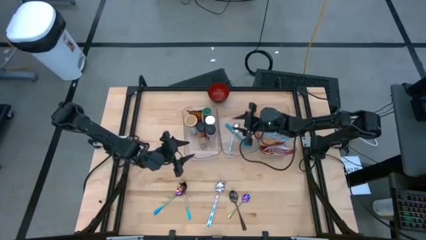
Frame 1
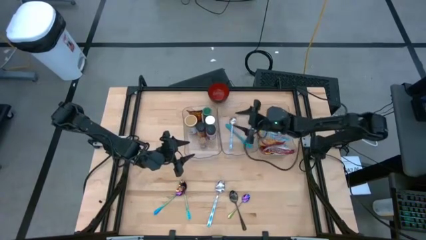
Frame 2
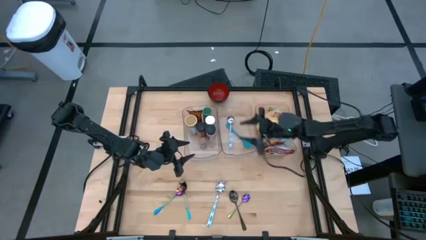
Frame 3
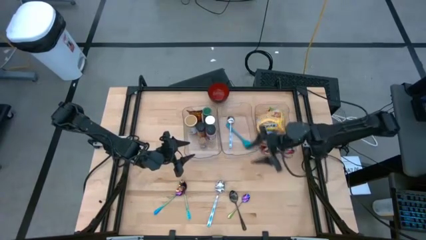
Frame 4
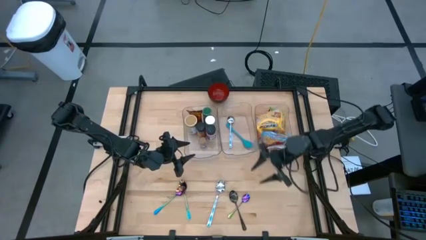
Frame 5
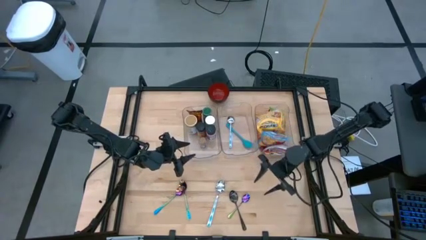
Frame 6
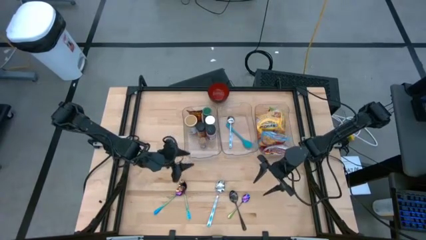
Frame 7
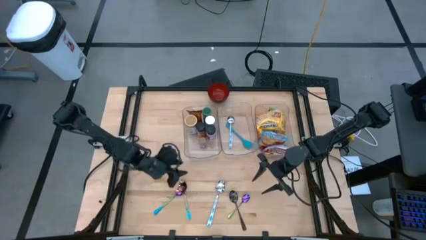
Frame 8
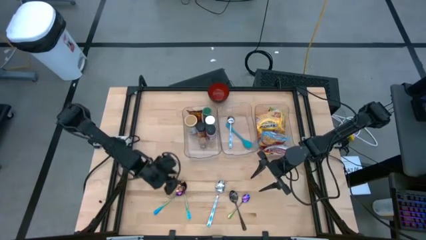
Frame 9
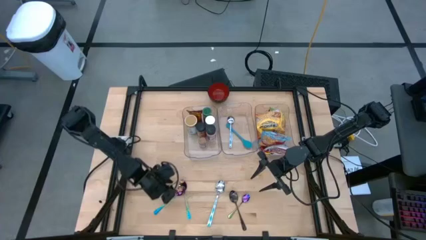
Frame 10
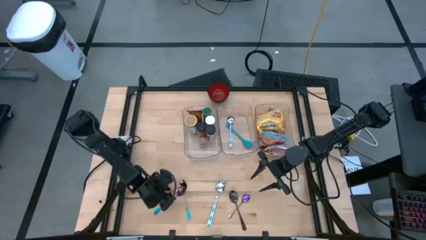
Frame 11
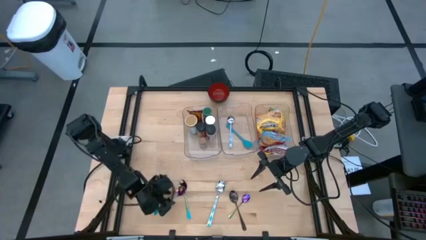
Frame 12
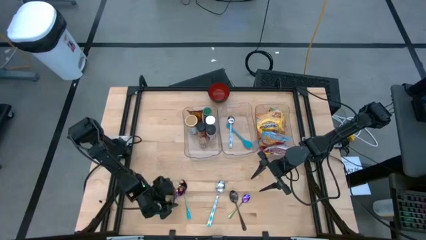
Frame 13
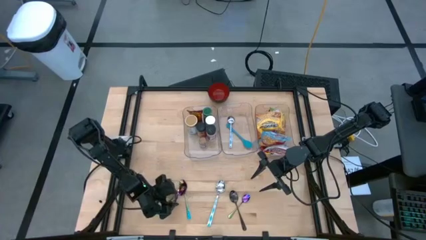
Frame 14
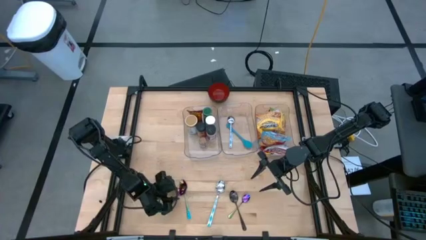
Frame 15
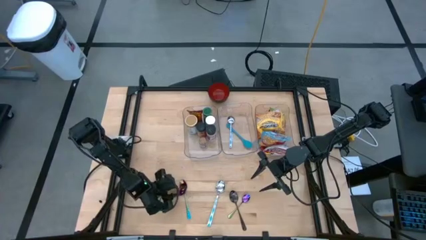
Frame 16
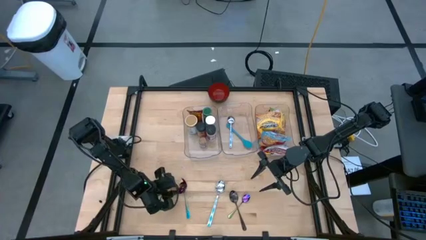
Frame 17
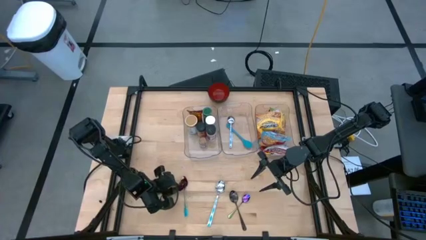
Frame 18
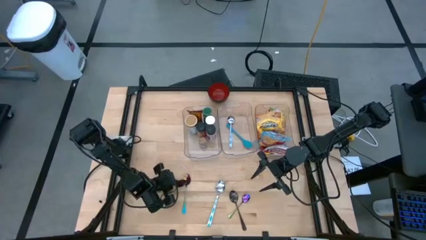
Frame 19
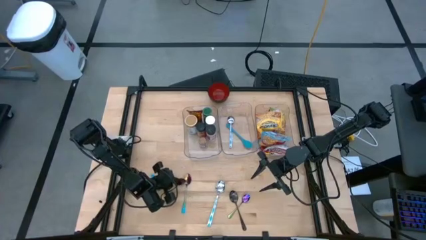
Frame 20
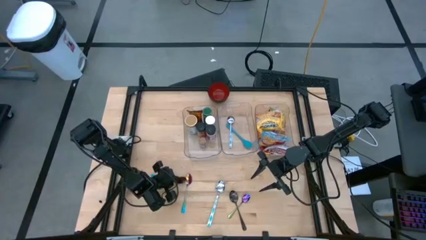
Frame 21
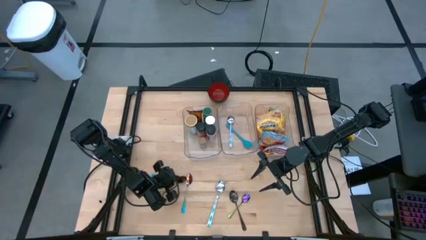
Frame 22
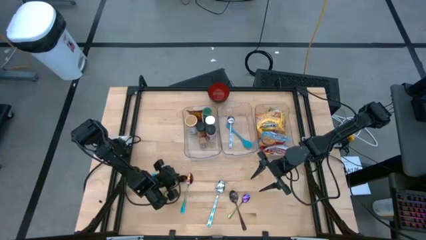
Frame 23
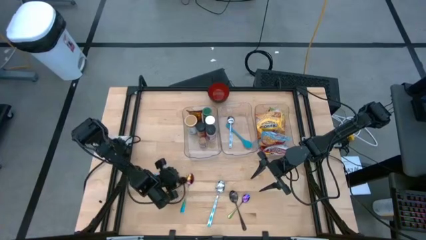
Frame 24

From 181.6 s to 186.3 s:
Task: Pick & Place Food Item
Put the left purple spoon into the middle transparent bin

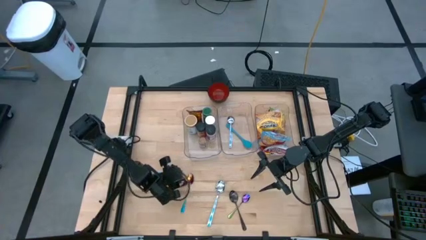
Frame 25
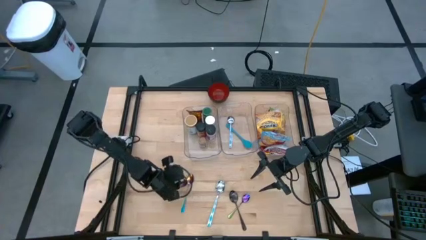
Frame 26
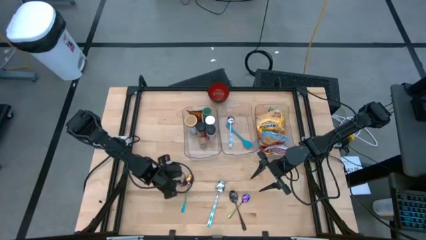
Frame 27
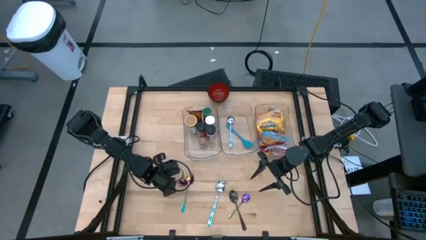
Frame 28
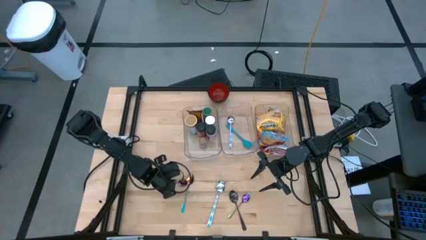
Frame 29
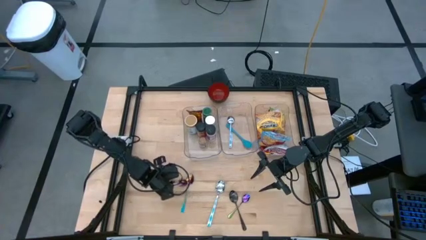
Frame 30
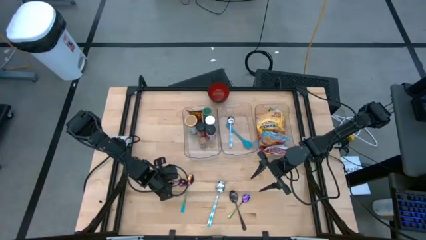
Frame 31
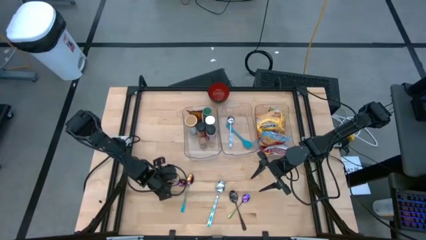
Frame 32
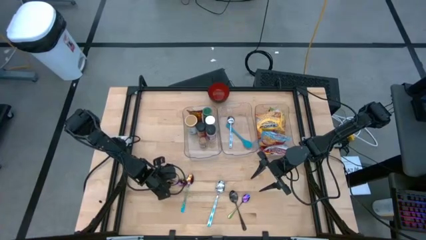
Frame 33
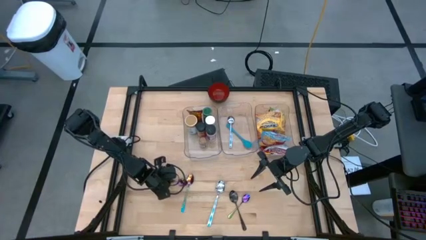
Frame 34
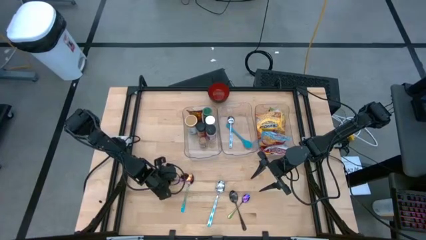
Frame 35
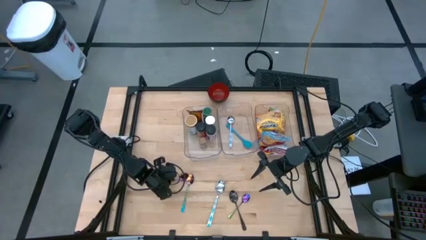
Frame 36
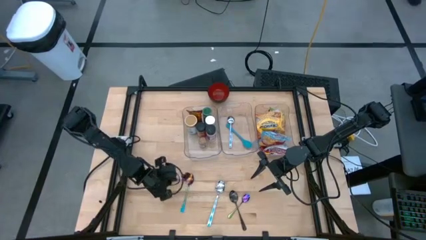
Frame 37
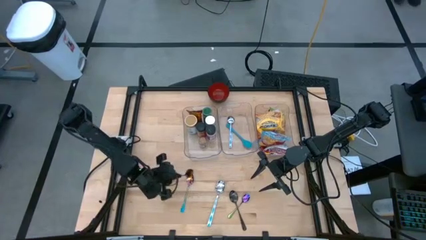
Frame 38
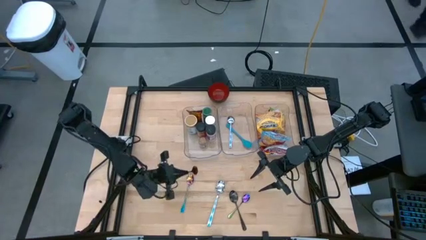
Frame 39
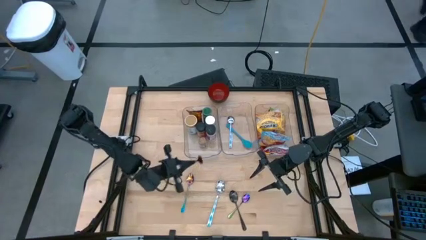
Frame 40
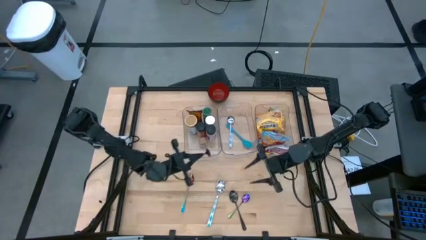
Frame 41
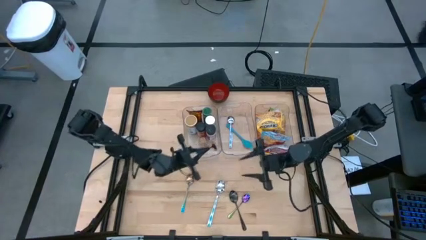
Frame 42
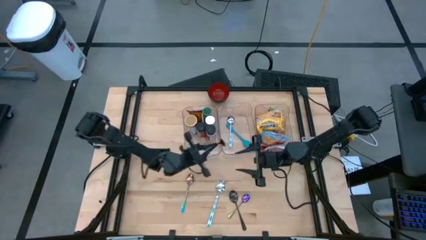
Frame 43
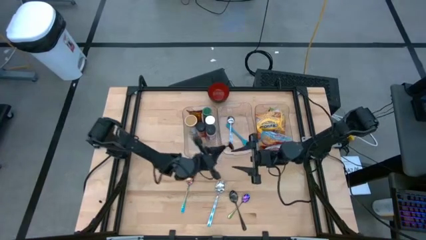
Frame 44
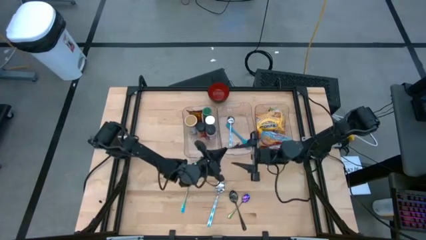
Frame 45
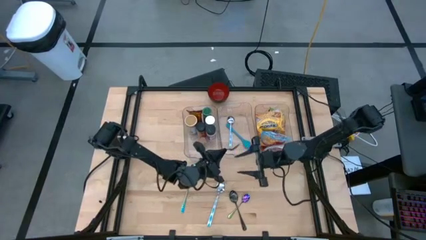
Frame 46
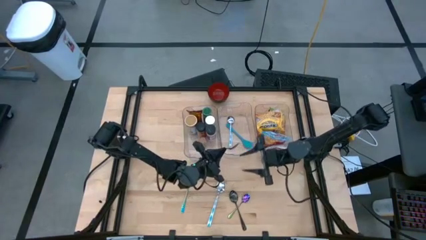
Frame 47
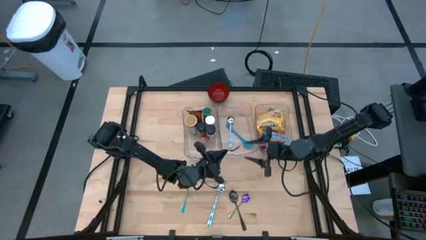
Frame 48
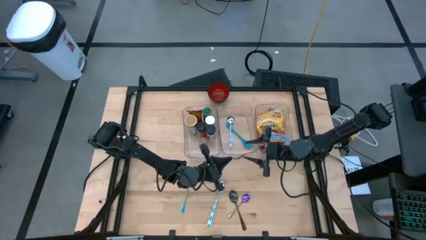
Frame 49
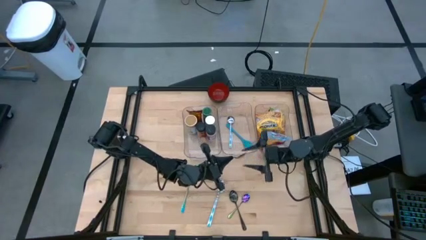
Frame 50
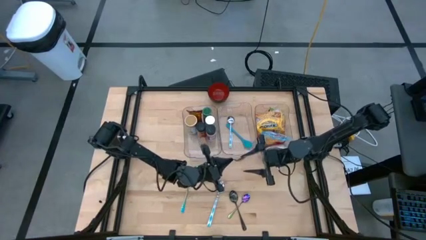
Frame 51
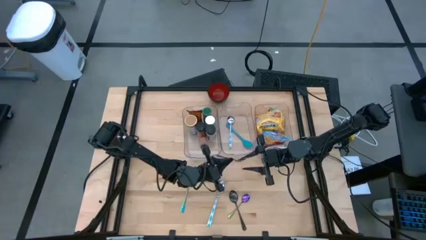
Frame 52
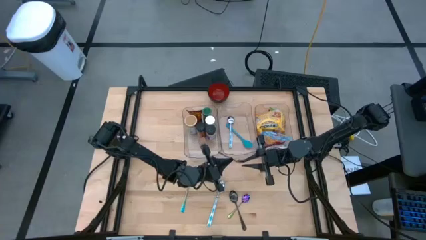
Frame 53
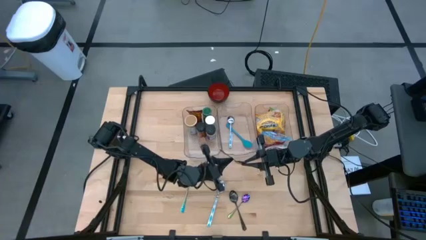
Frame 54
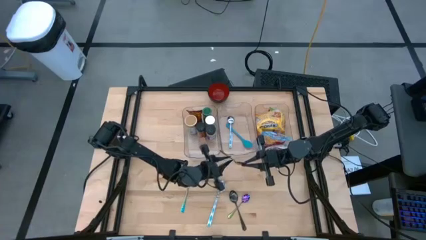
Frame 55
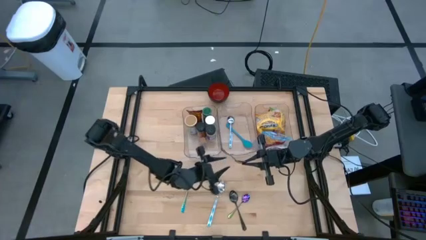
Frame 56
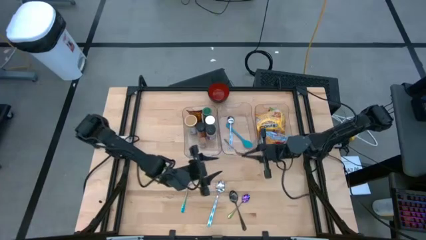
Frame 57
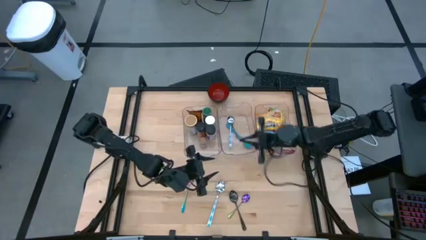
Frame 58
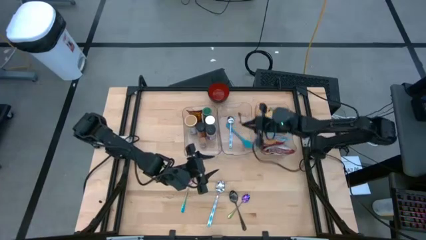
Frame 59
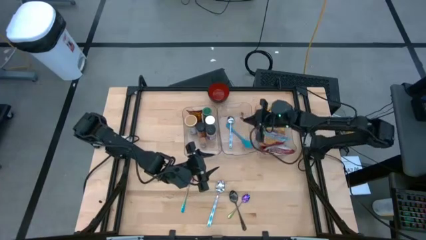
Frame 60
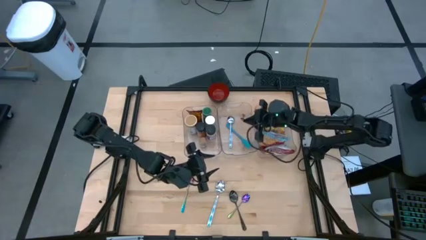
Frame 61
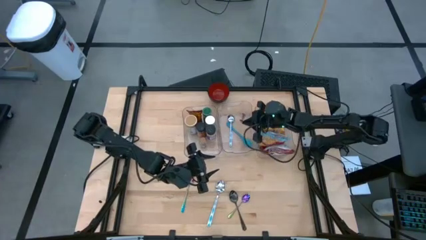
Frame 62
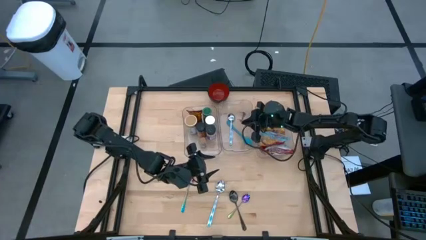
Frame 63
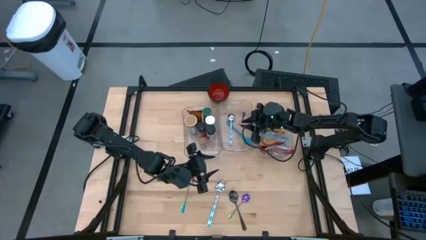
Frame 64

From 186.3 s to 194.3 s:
Put the left purple spoon into the middle transparent bin
